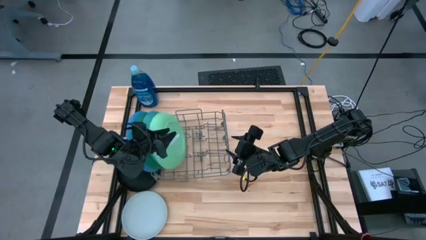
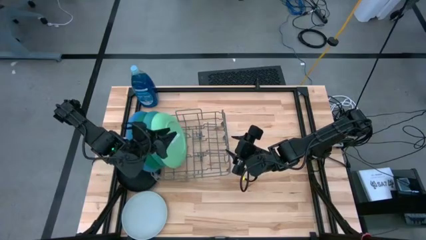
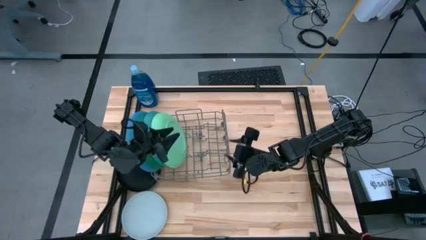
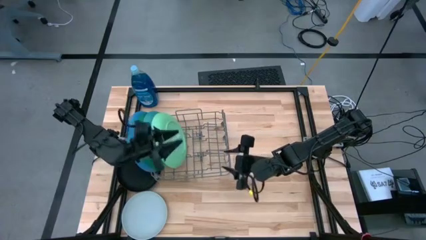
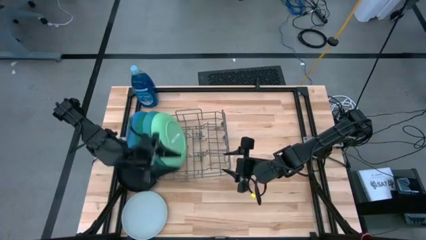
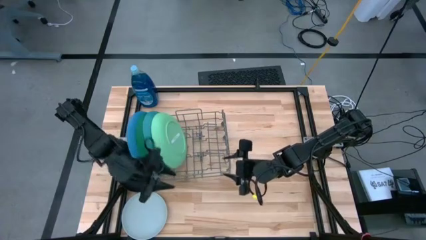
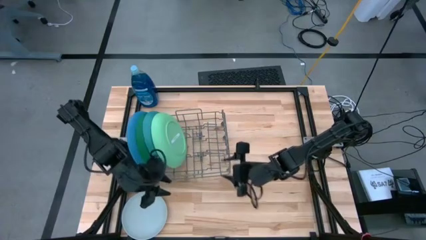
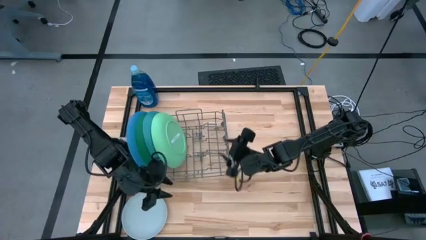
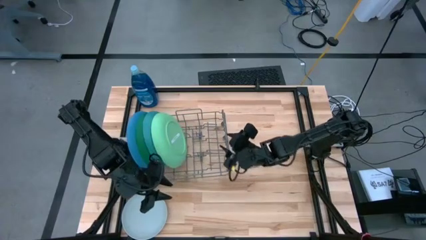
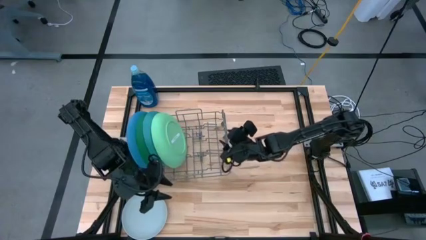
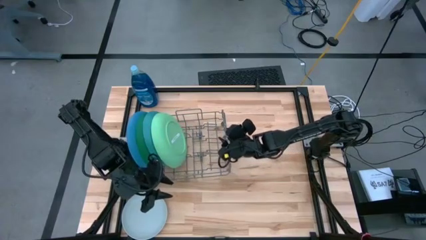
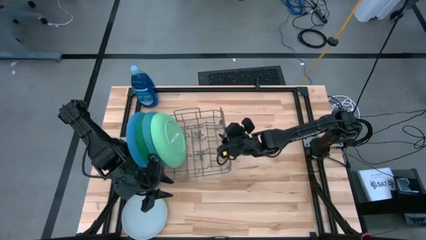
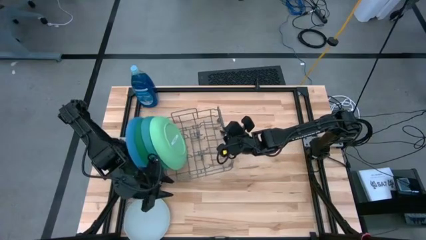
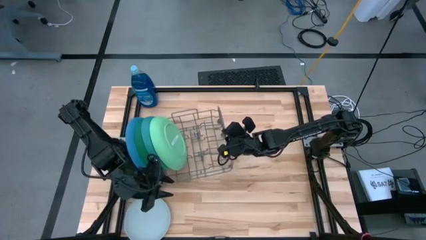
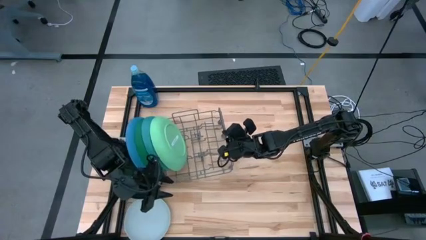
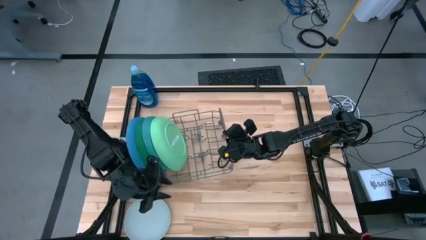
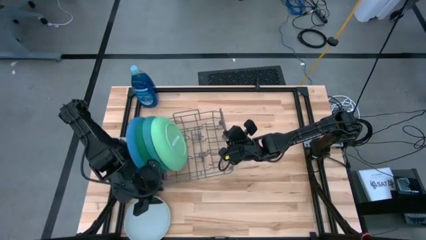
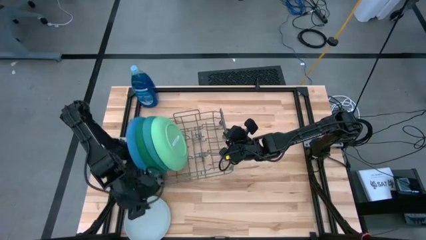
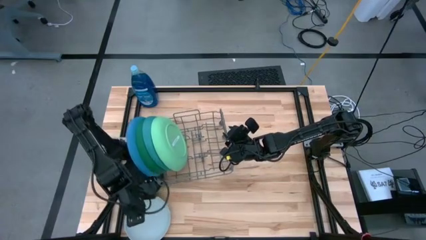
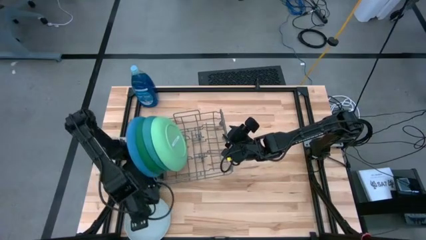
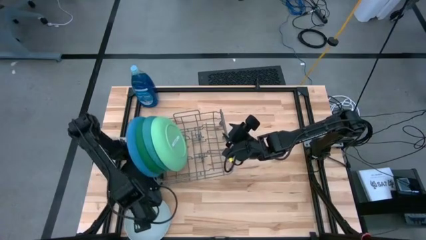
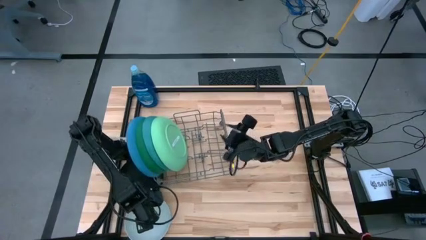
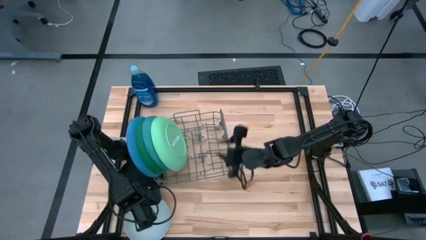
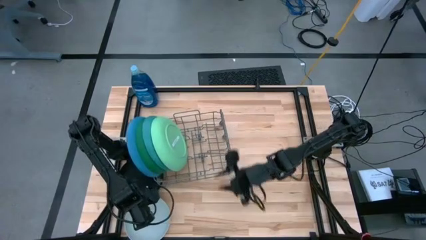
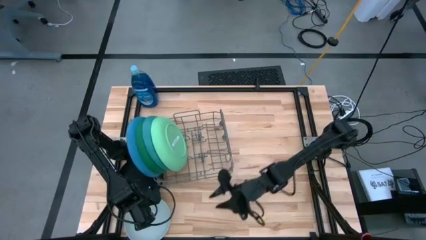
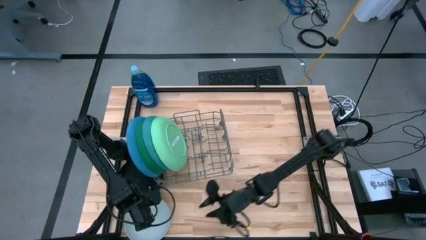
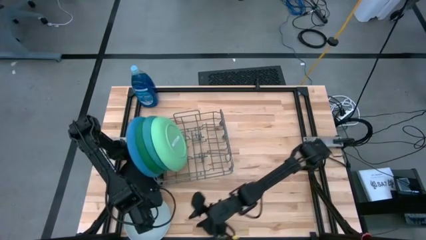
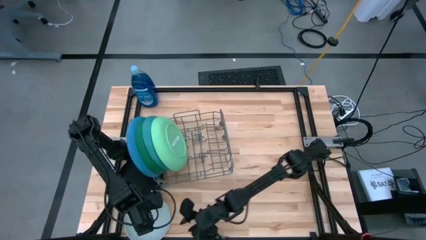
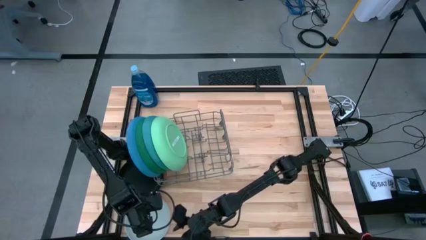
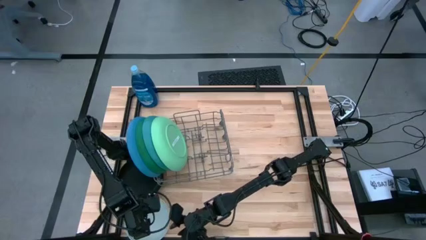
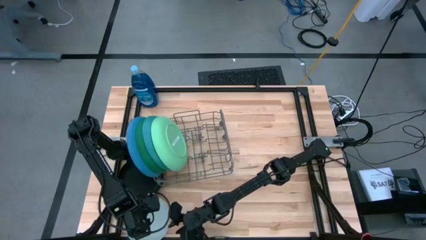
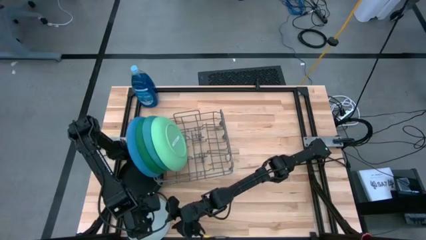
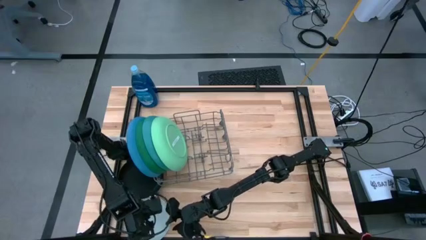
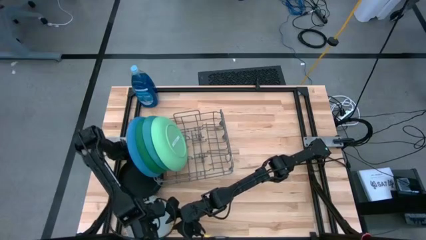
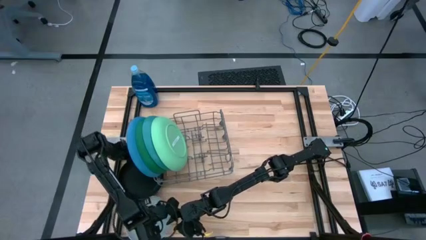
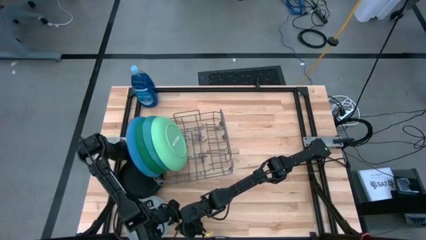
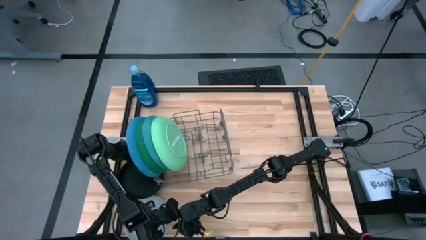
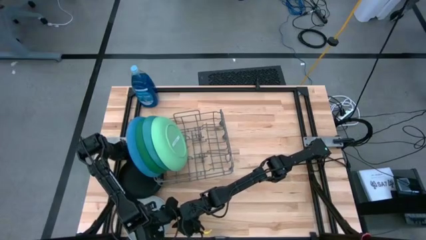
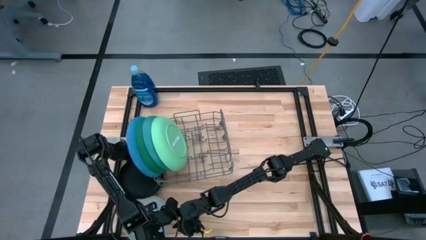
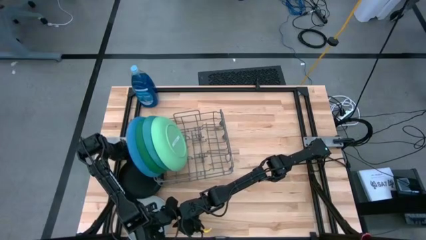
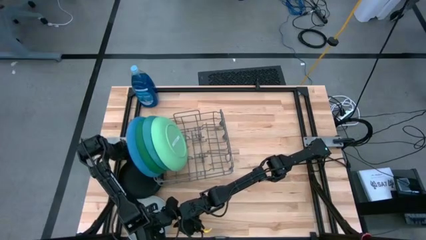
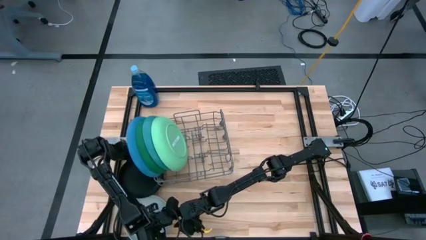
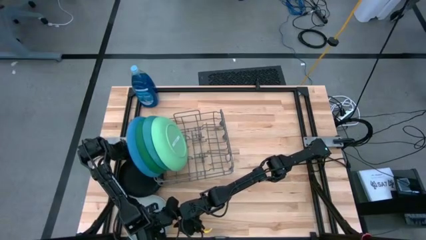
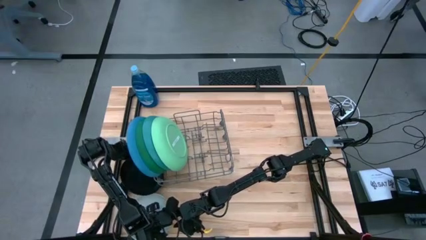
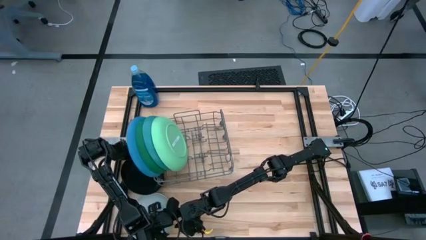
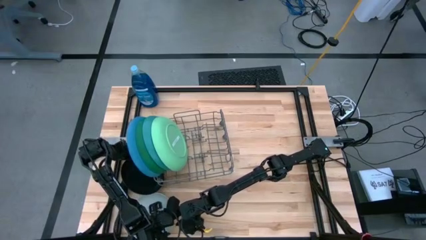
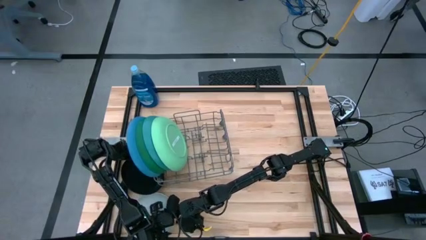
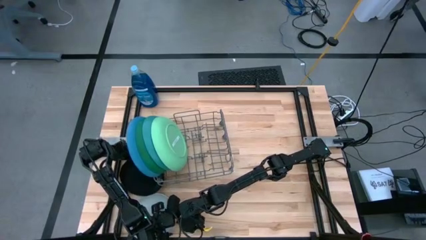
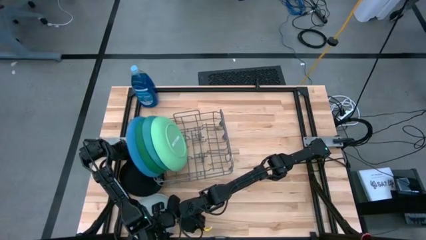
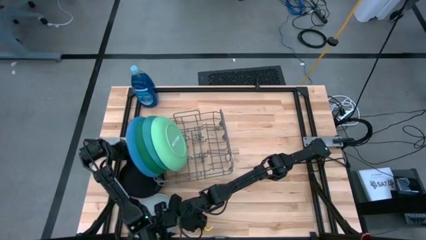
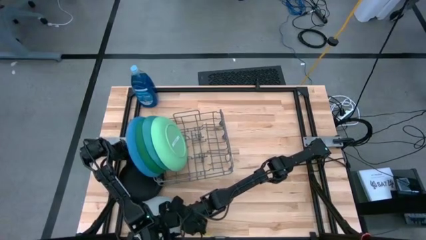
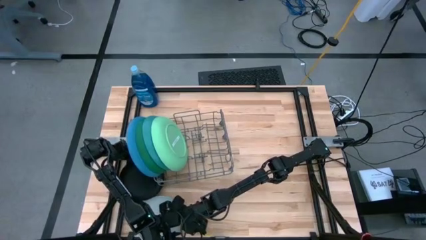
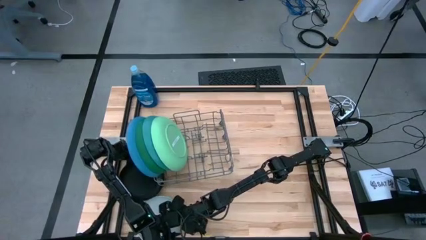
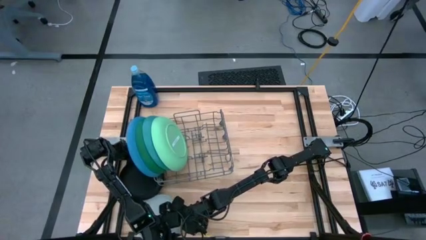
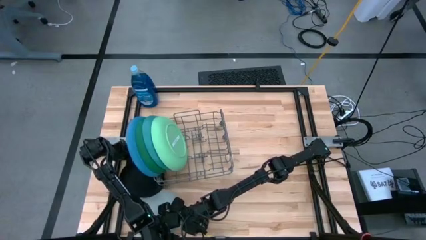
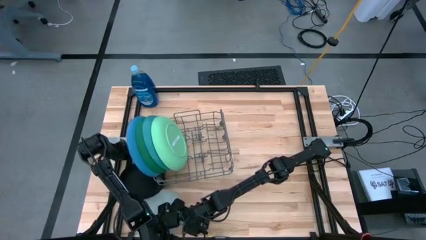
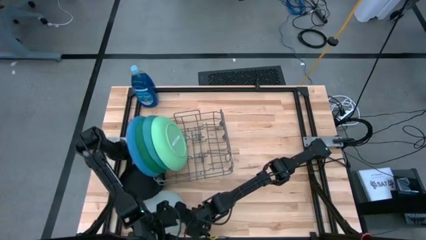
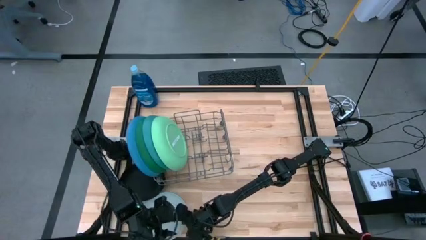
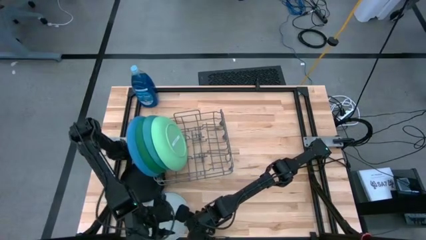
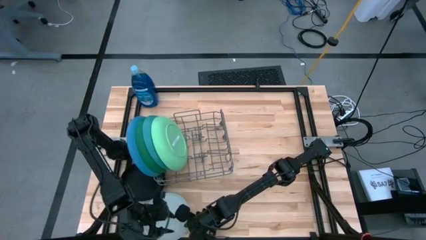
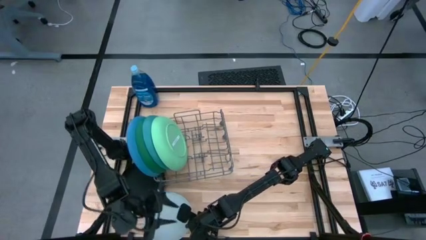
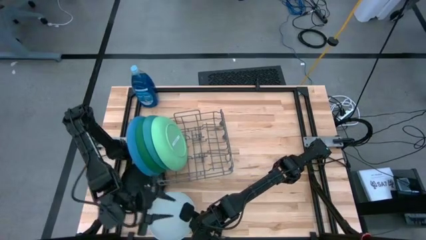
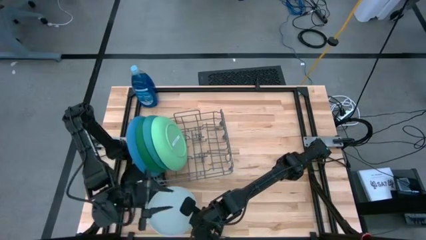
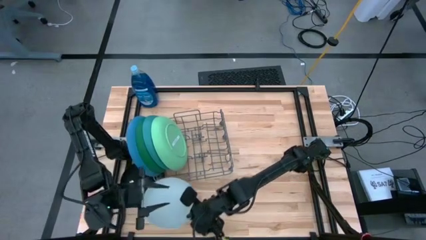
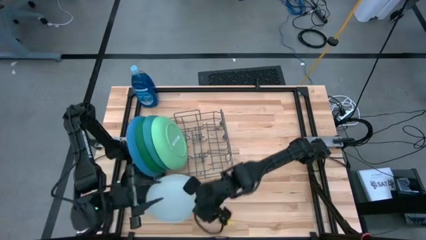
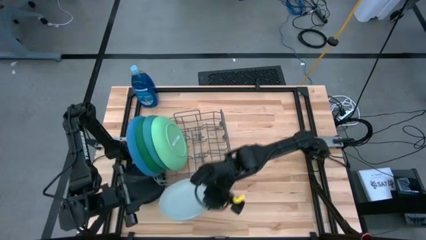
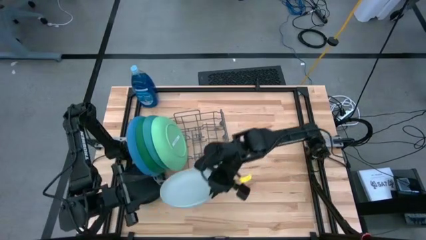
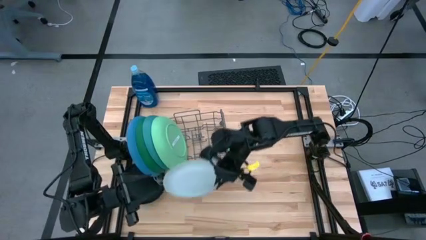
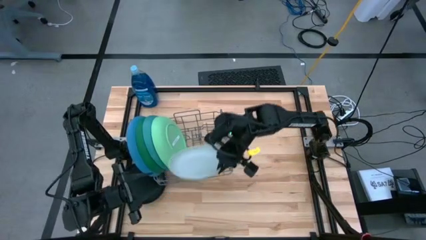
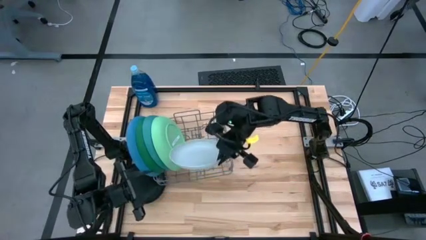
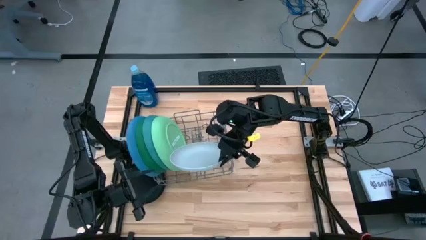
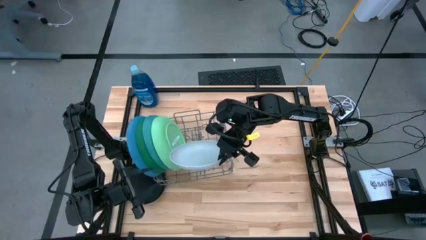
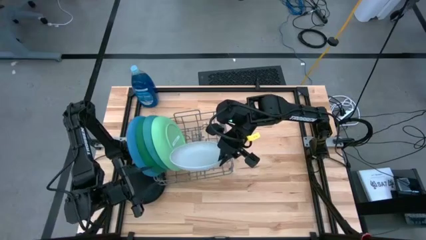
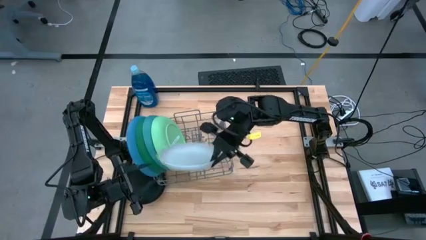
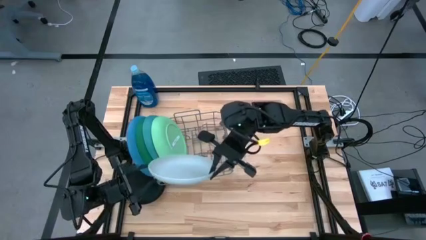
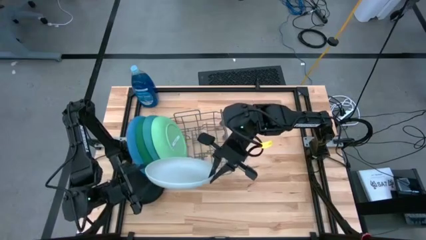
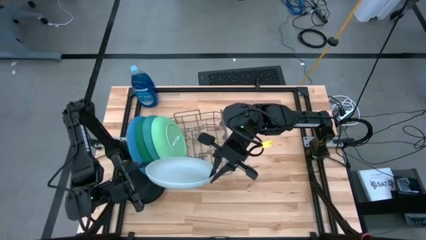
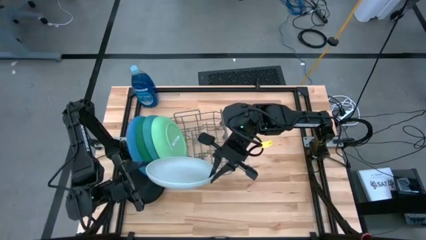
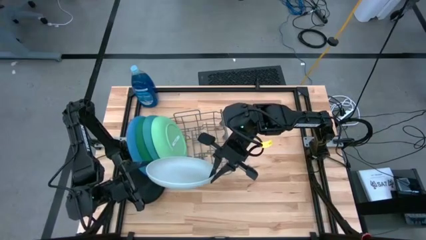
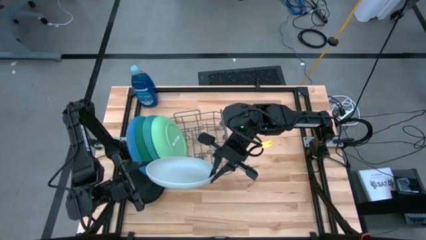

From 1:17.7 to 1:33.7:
Task: Sort dishes
Put the gray plate into the gray dish rack
